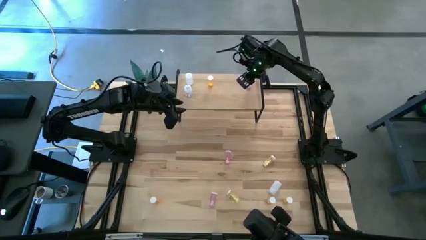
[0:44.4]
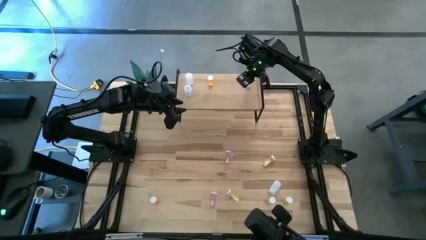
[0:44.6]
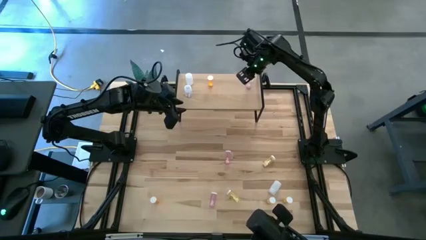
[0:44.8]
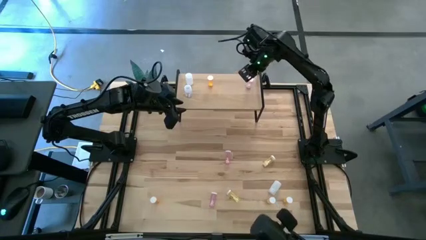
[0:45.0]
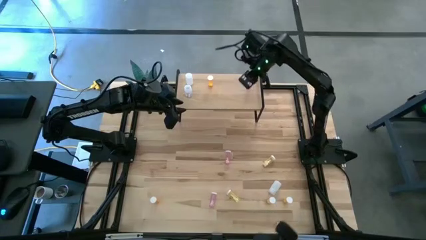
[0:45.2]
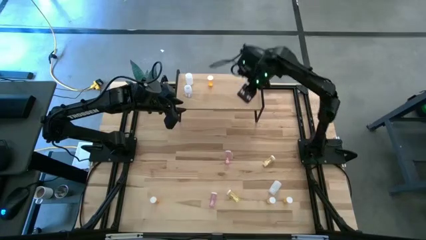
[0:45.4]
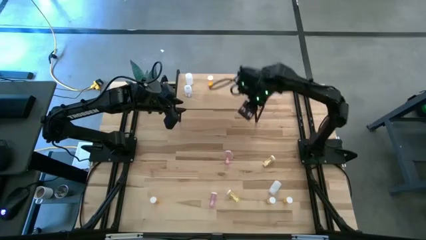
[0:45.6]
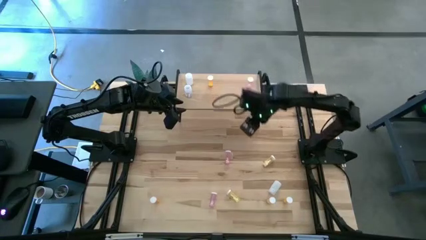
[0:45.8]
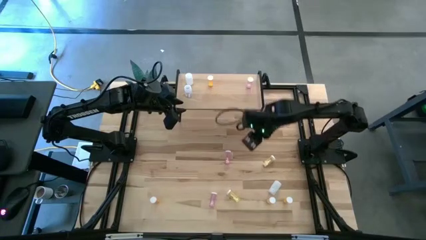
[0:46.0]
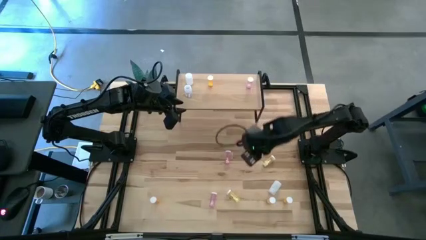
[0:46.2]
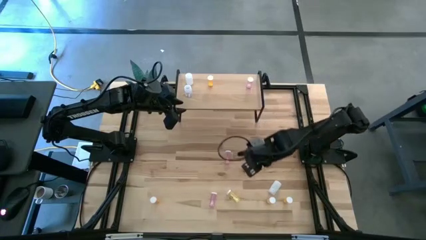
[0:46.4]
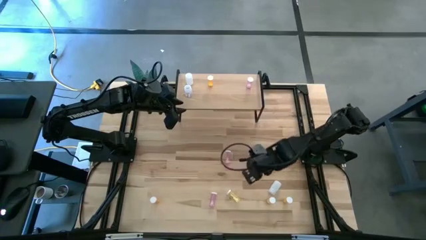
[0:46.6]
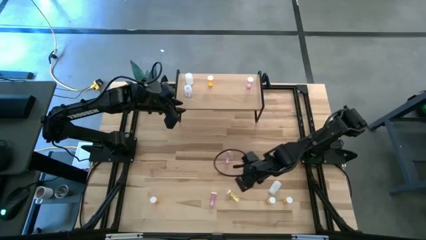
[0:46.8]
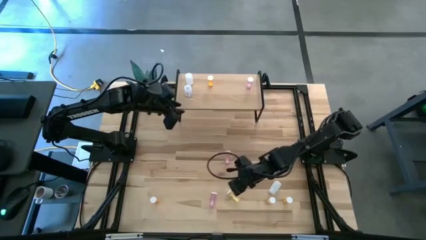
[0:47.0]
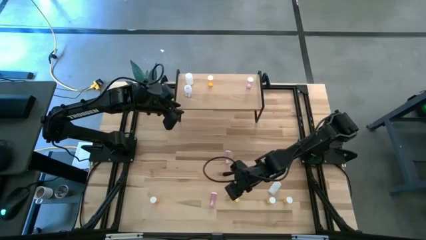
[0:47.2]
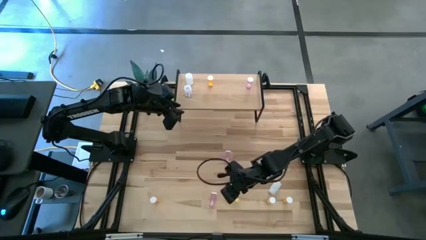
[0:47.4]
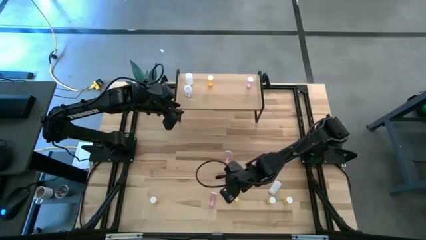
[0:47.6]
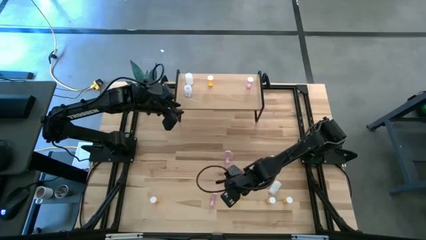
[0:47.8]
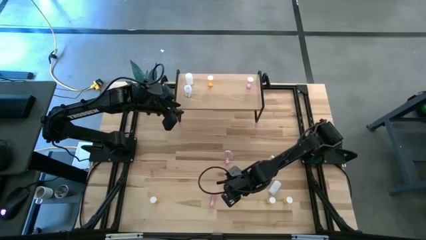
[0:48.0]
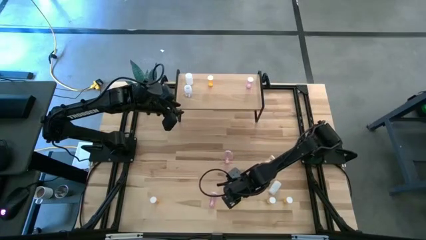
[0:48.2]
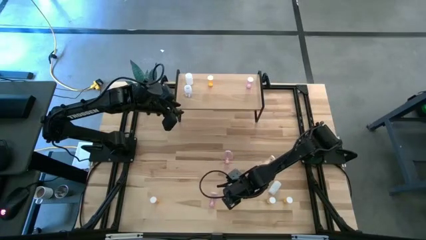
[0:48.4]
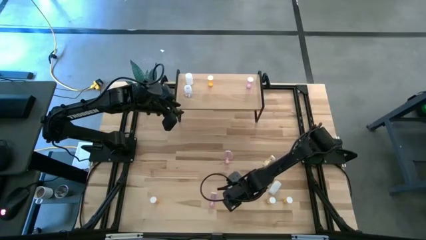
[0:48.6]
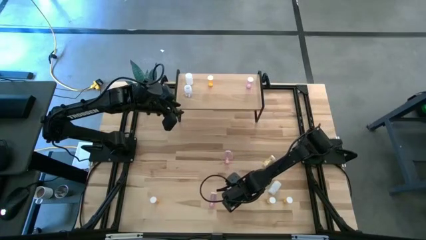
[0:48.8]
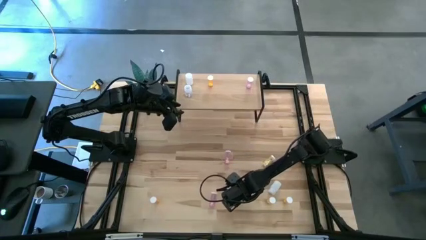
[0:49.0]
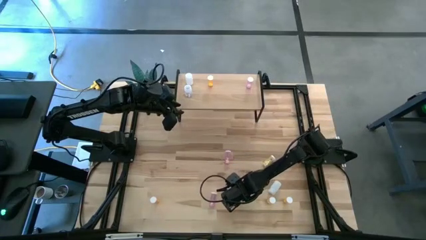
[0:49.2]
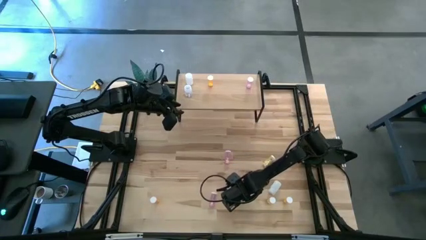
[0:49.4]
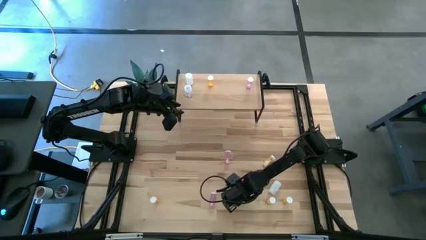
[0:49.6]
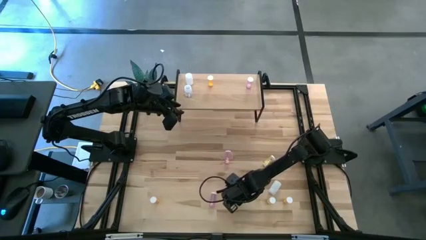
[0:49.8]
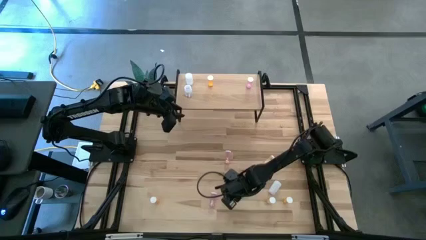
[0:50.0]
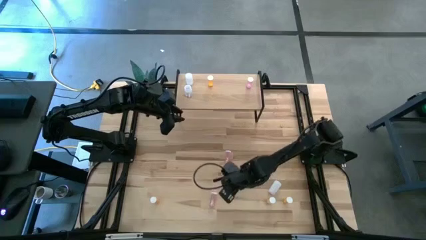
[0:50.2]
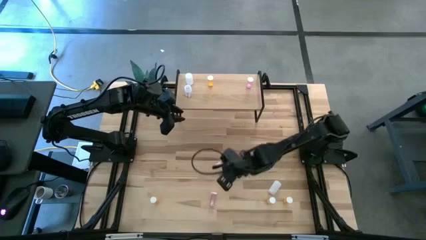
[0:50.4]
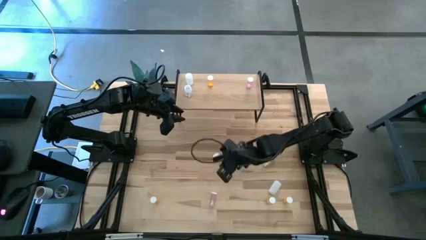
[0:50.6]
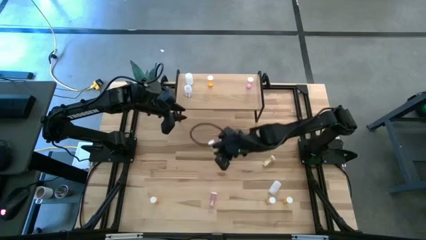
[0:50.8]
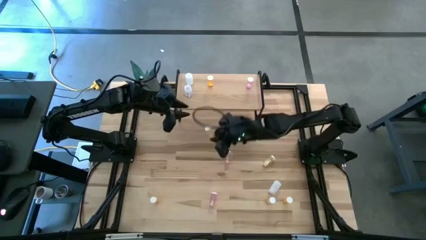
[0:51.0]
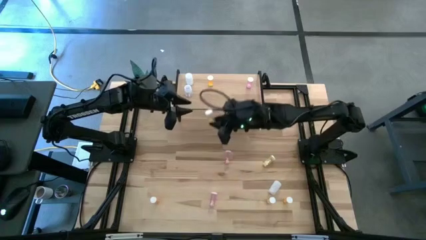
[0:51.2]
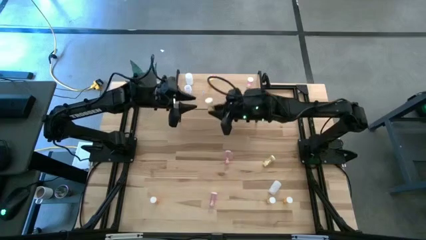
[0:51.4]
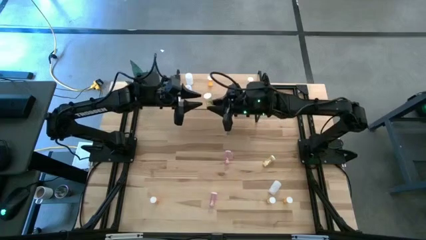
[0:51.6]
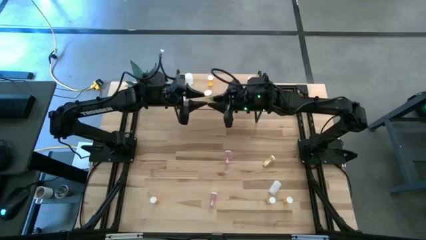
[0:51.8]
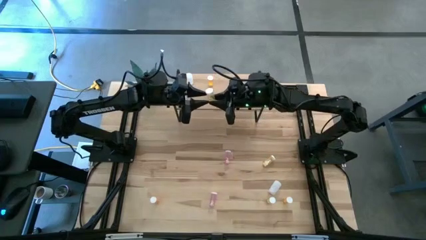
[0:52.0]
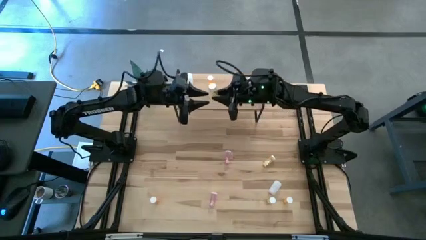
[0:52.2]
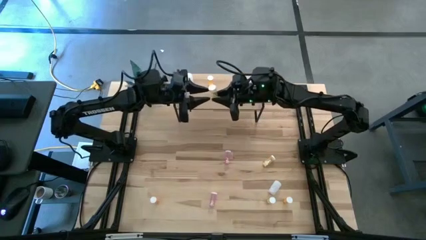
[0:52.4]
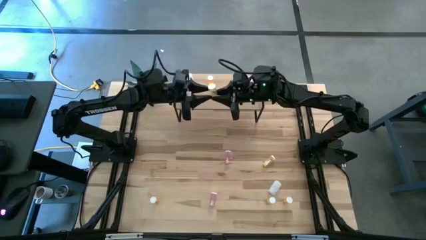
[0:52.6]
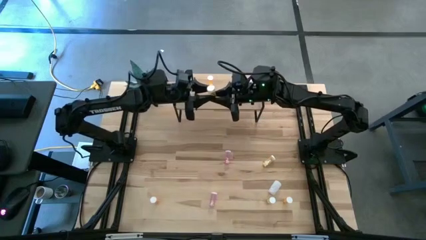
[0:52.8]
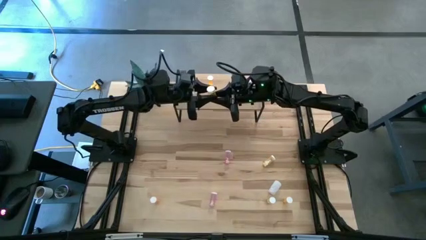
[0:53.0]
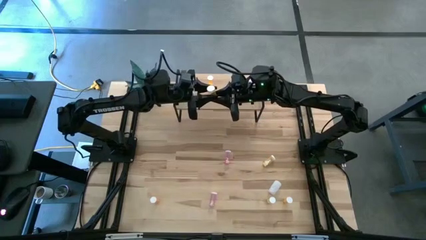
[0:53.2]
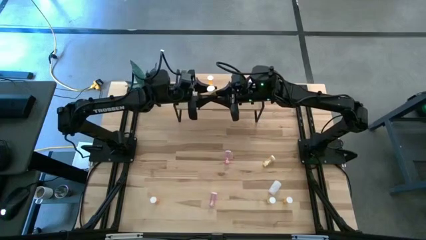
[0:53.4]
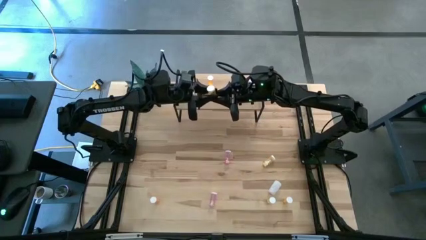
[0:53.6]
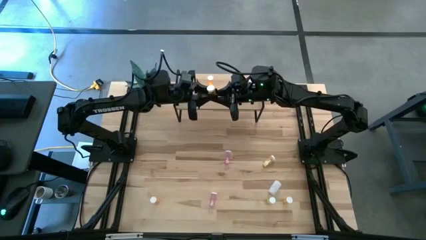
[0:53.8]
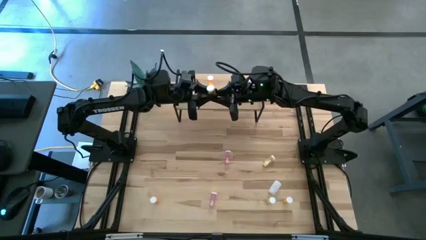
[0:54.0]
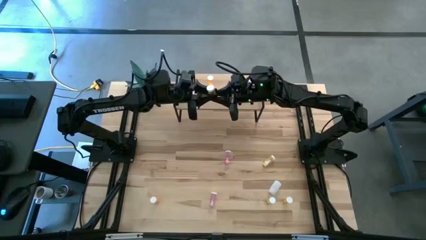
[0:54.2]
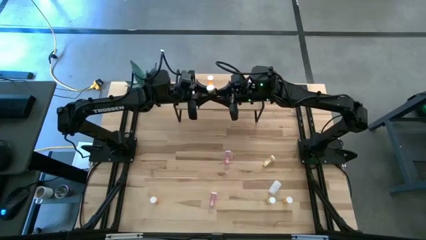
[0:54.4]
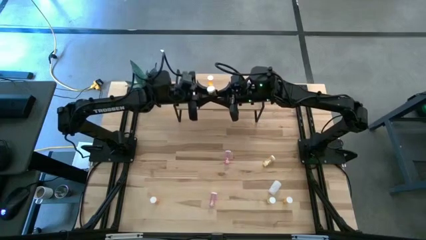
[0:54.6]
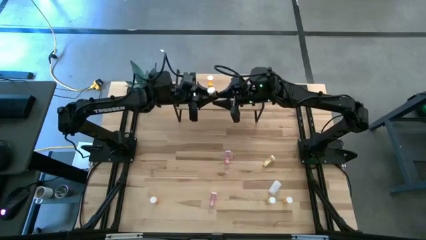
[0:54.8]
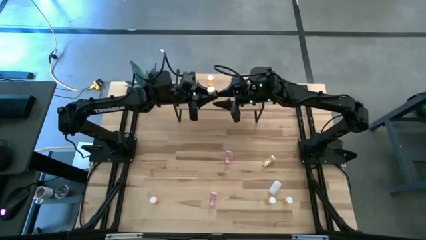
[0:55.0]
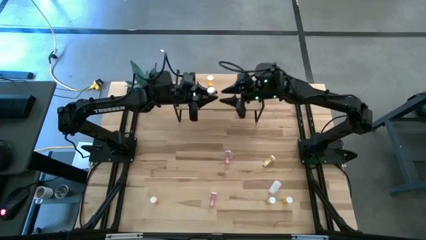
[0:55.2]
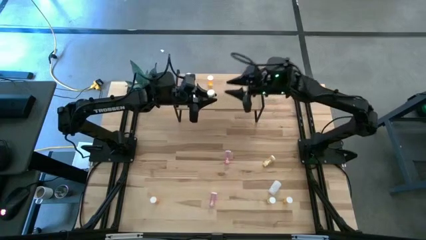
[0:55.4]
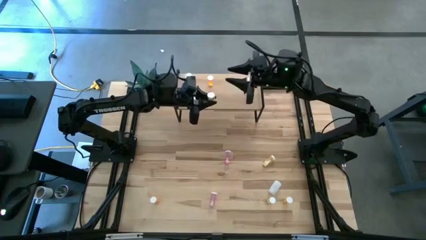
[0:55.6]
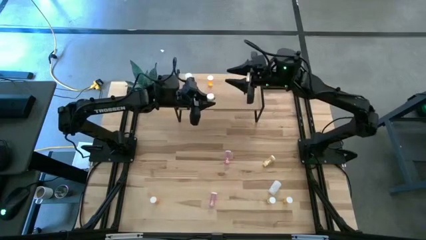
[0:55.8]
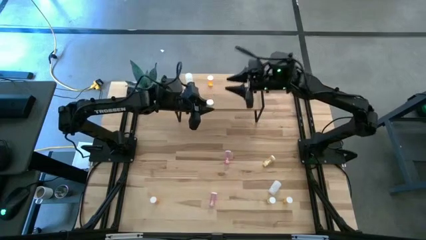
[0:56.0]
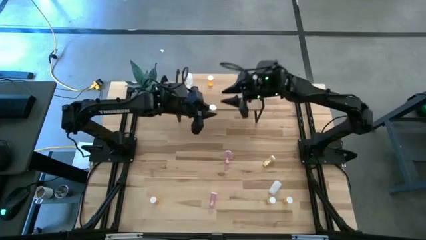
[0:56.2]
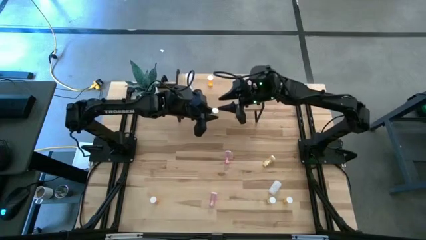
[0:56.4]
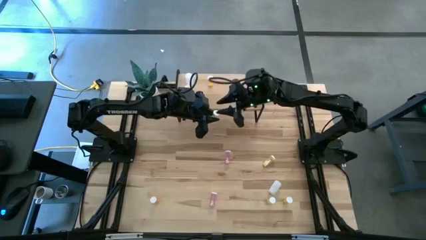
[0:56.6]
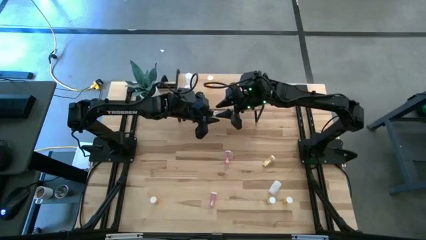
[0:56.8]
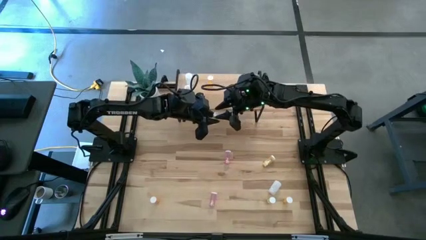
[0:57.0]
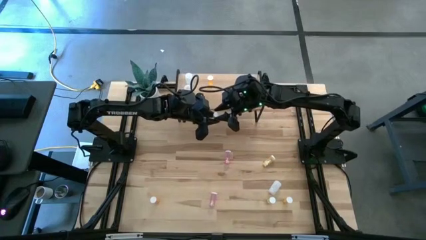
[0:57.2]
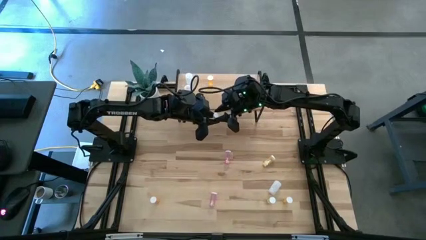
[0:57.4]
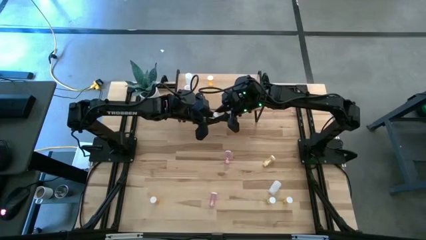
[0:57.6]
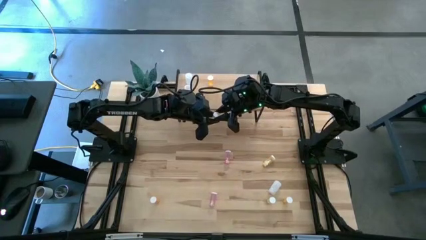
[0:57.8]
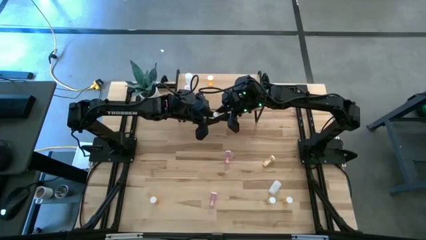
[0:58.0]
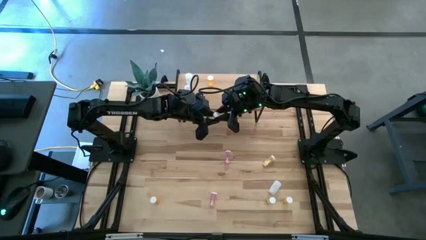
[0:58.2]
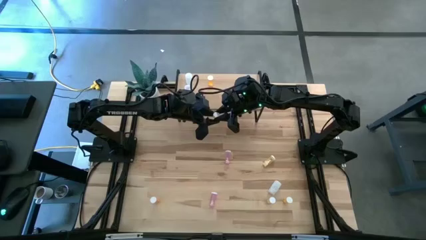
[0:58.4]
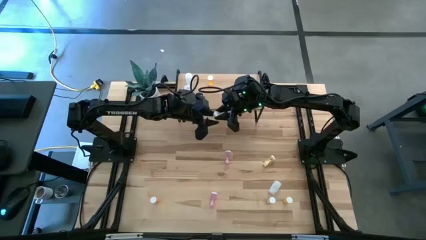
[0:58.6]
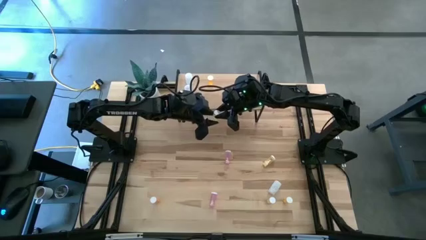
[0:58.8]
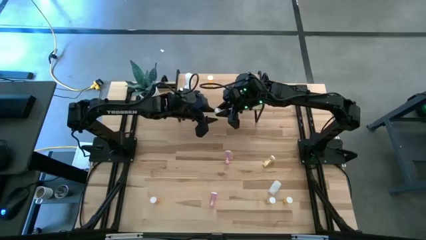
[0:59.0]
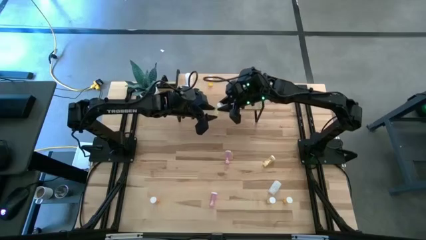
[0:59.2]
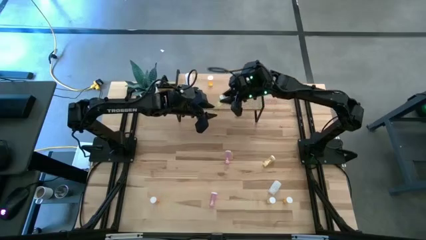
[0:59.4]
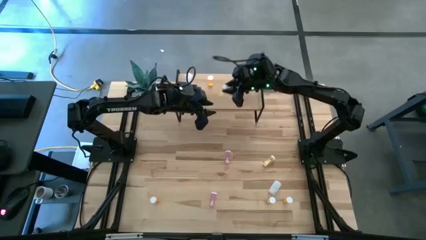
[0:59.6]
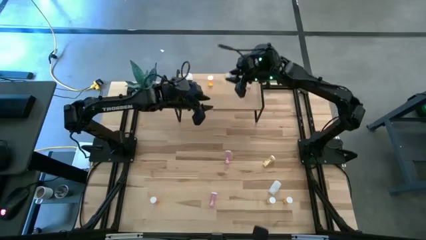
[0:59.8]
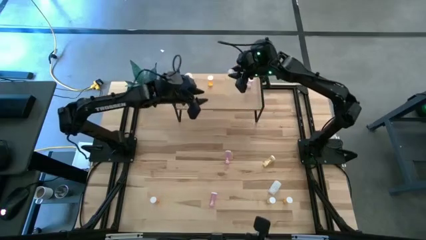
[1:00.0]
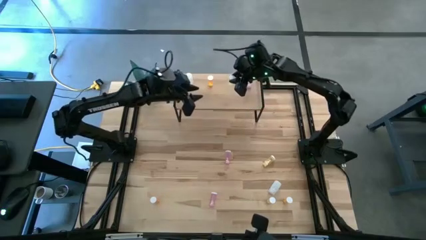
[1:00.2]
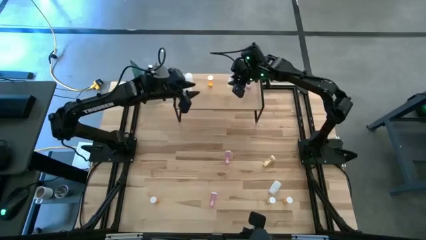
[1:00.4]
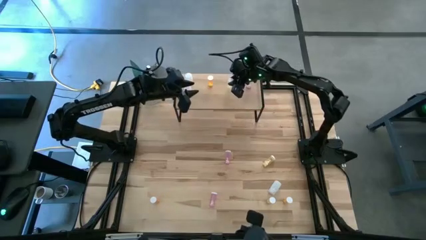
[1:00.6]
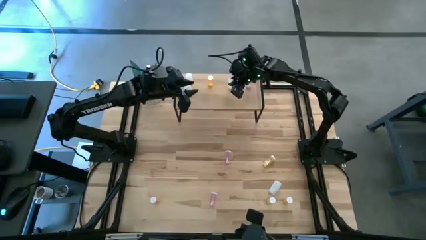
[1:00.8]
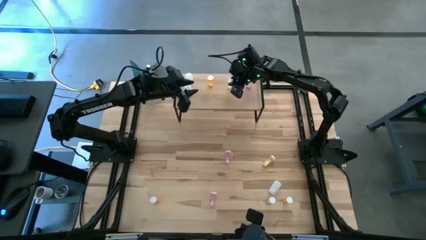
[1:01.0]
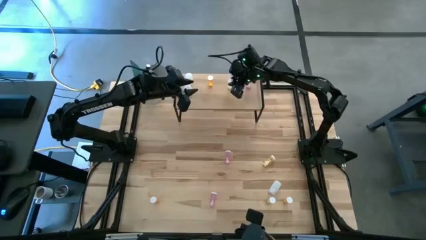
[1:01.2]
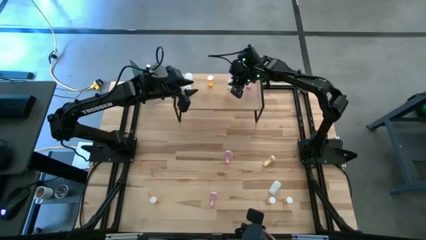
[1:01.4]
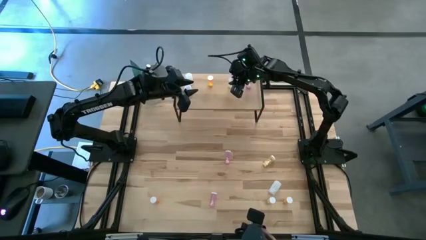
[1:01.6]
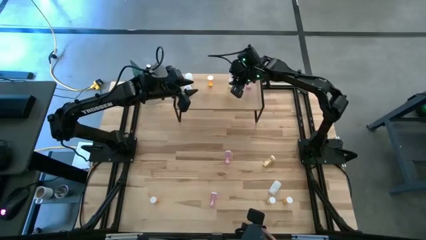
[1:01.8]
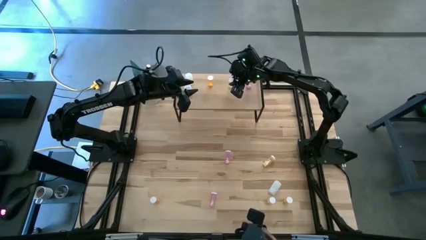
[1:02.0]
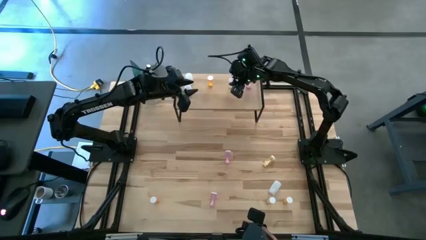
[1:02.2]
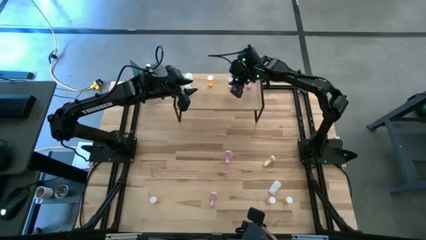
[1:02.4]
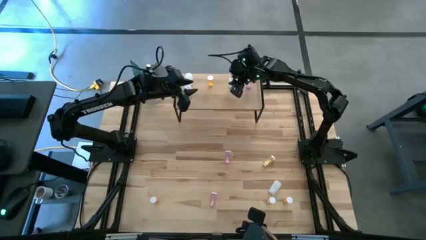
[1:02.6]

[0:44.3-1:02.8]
Task: Pick and place medicine bottles onto shelf by color
Put the bottom left yellow pill bottle on the shelf
